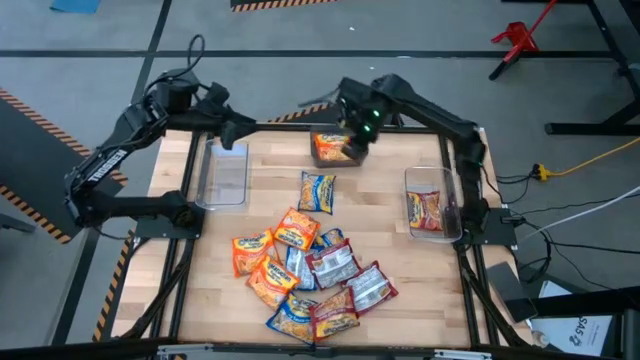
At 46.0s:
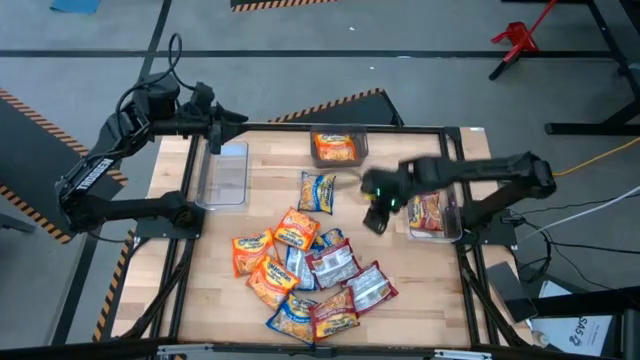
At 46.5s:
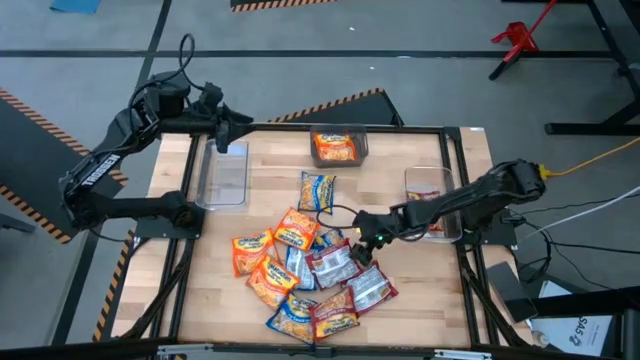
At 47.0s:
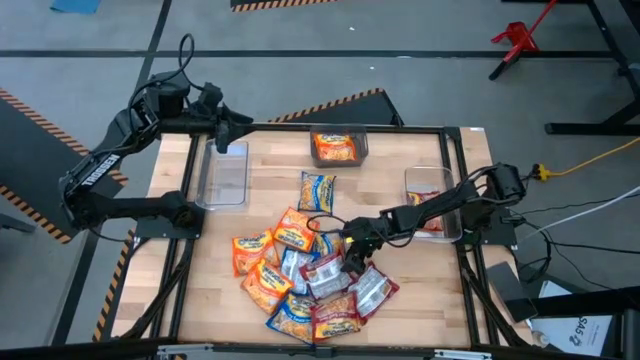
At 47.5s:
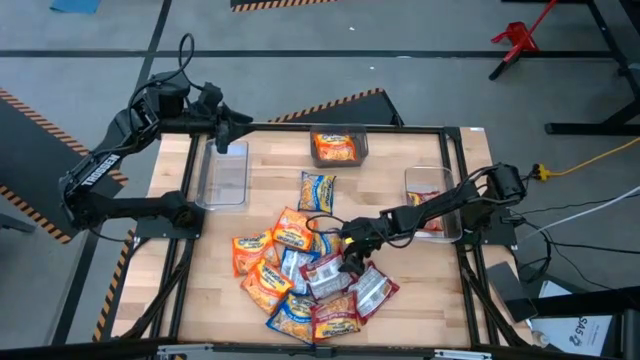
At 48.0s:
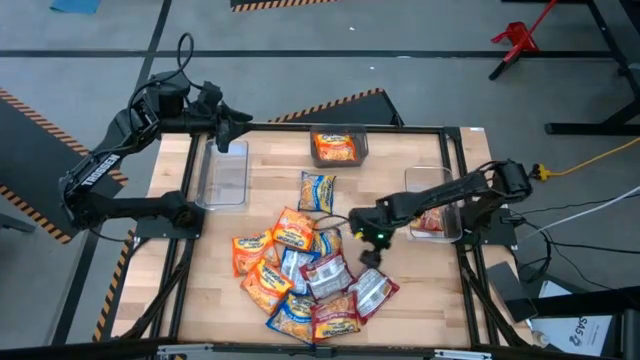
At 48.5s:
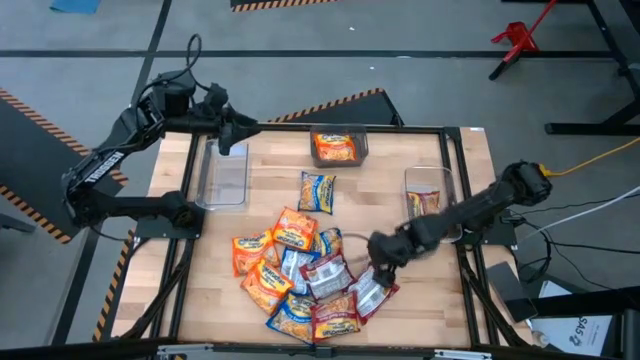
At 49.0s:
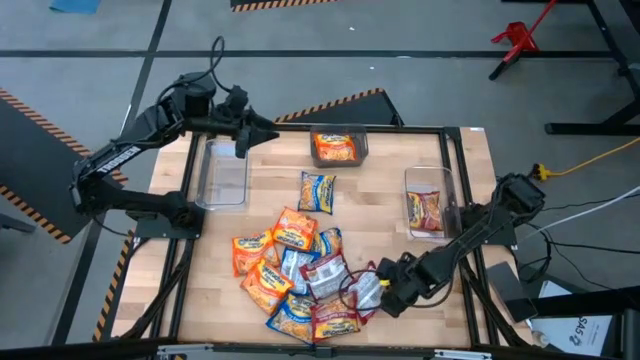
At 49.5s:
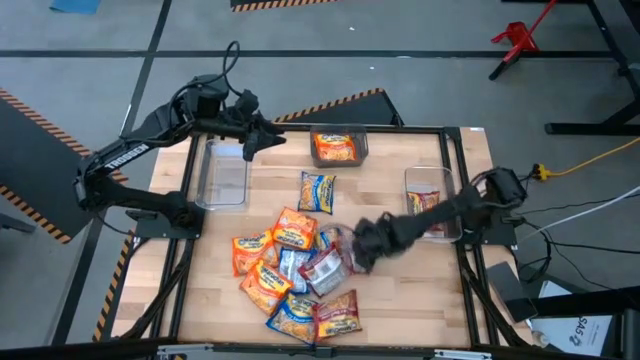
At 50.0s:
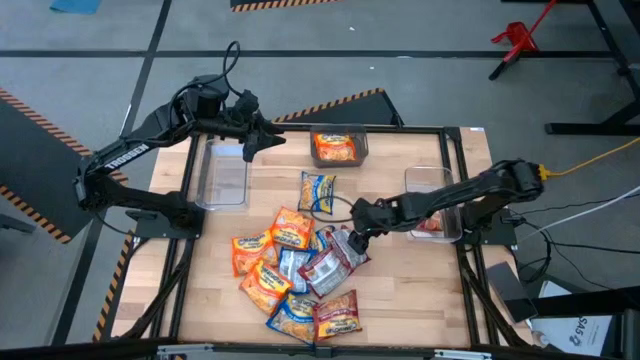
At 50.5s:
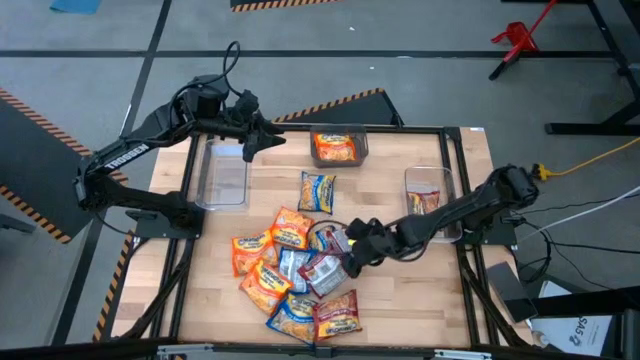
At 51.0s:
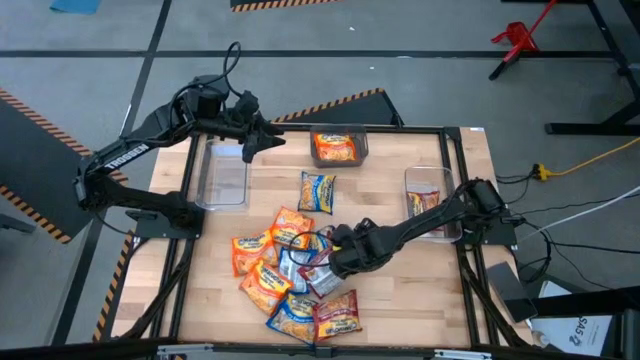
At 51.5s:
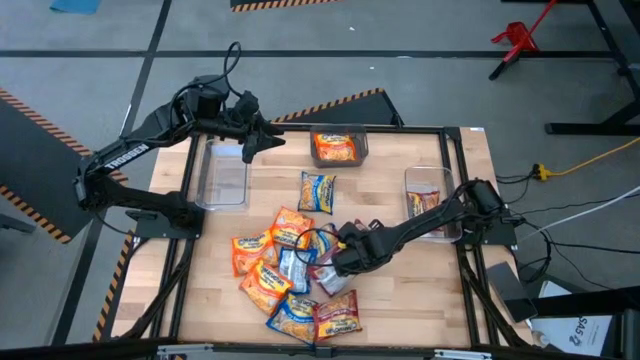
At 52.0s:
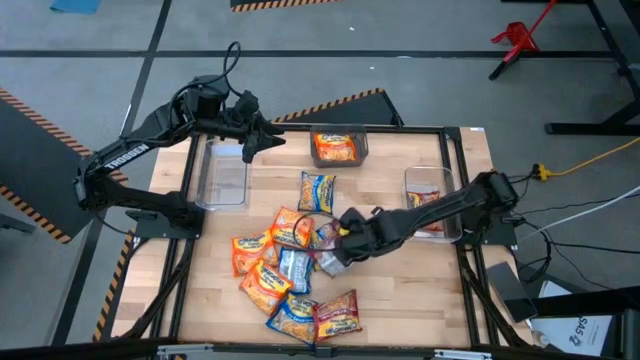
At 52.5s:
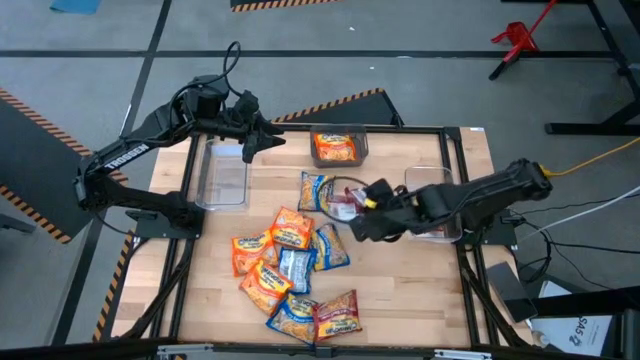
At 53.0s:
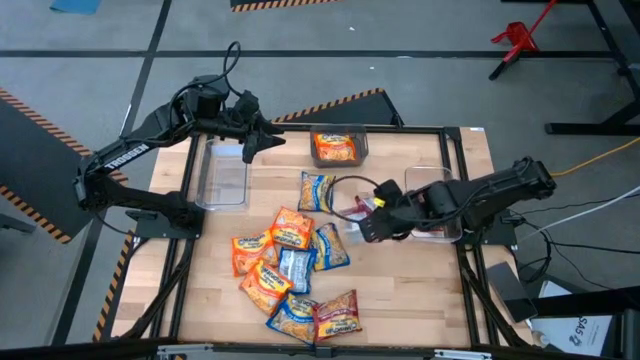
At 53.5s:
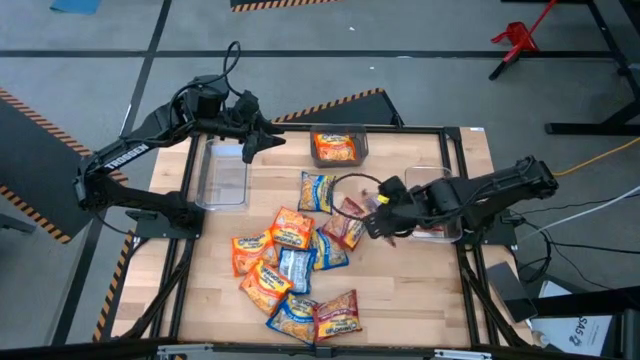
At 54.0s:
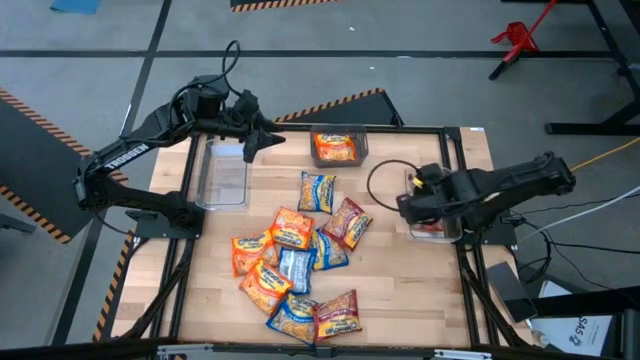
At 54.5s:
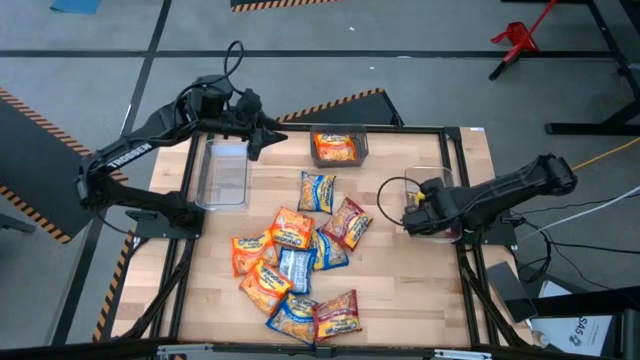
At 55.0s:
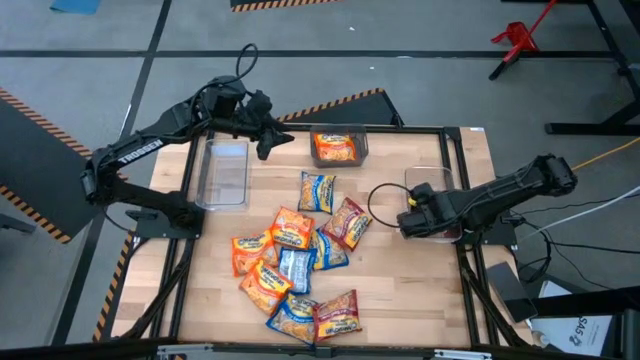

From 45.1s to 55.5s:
Task: Sort Maruchan noodles
Put the red noodle pack into the right transparent bin

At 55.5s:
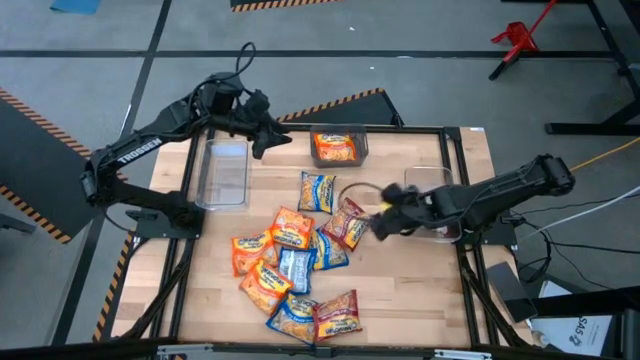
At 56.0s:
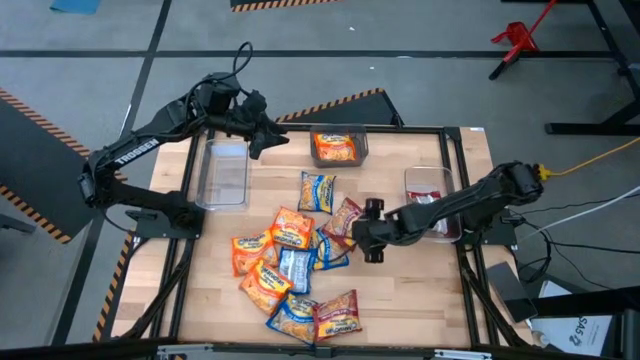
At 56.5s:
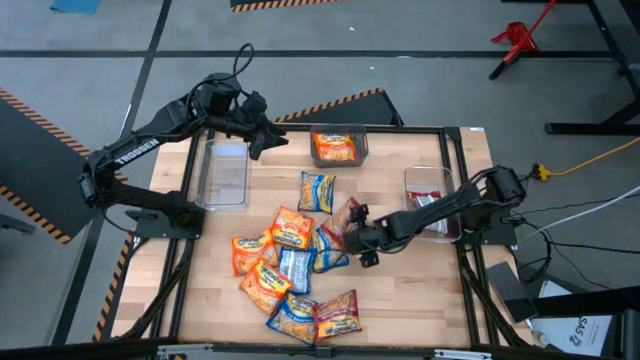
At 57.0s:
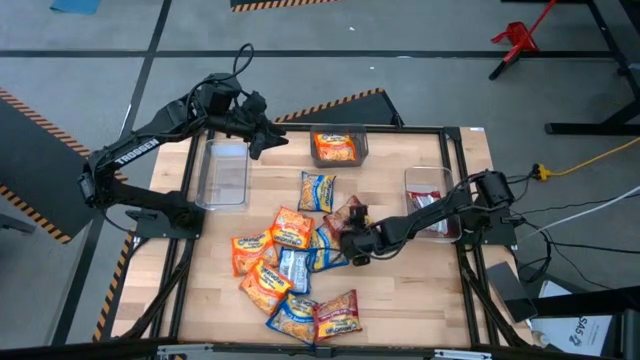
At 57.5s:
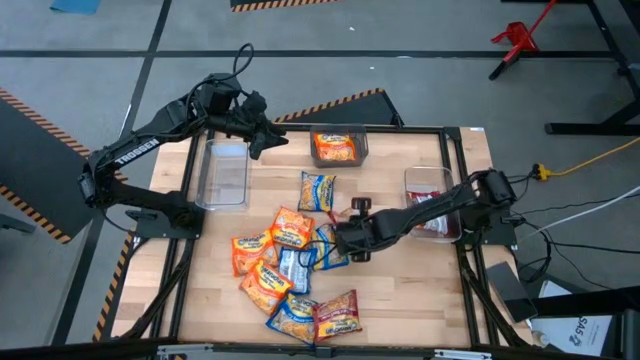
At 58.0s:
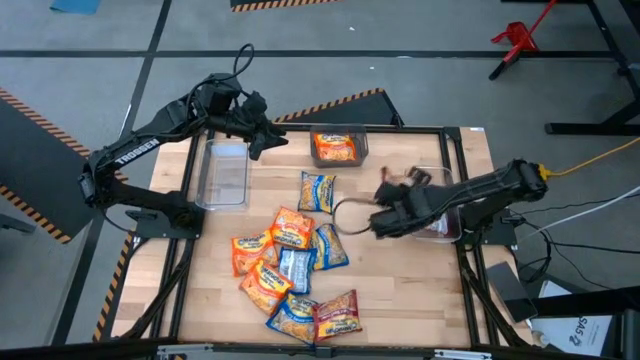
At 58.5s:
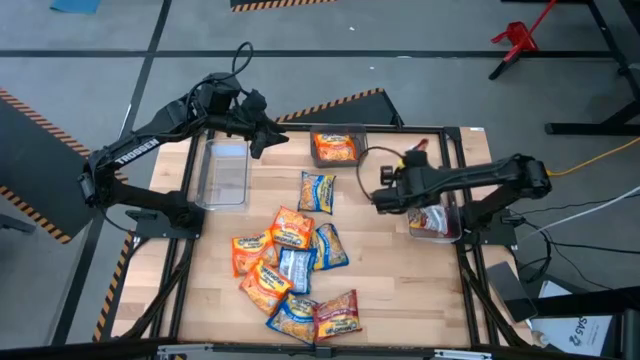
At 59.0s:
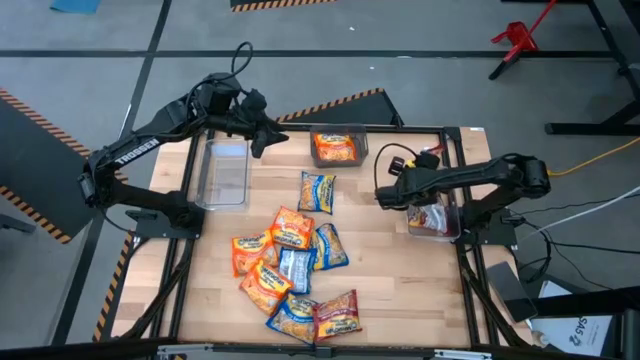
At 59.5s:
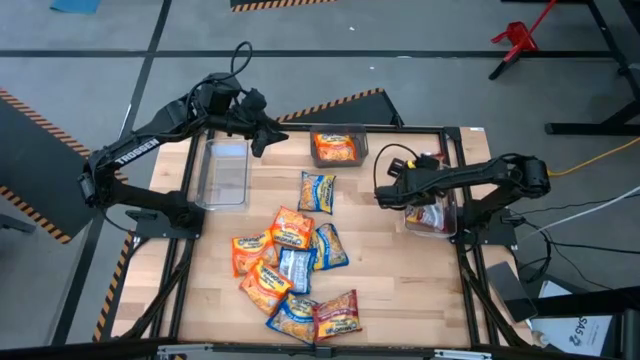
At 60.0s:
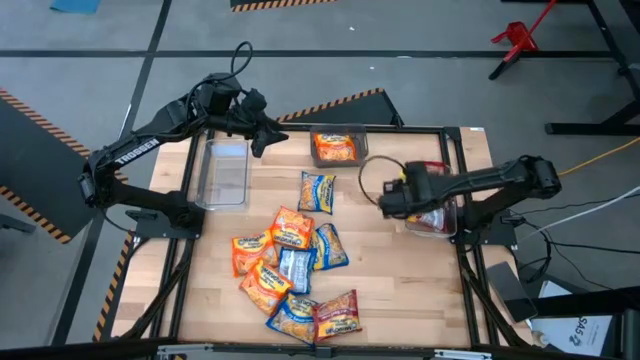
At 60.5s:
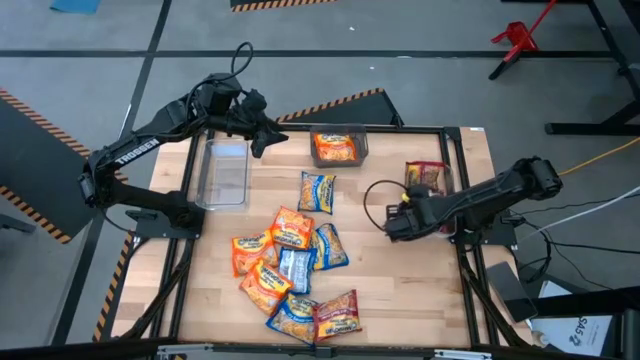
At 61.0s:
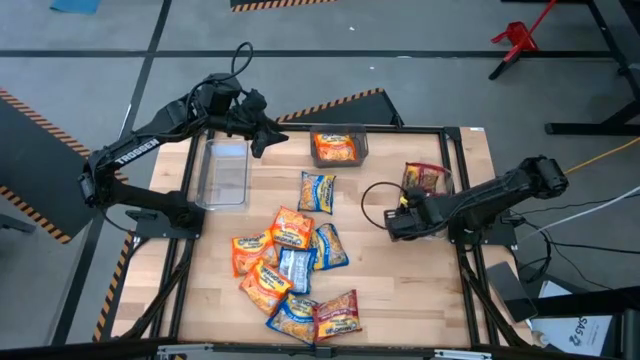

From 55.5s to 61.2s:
Put the red noodle pack into the right transparent bin

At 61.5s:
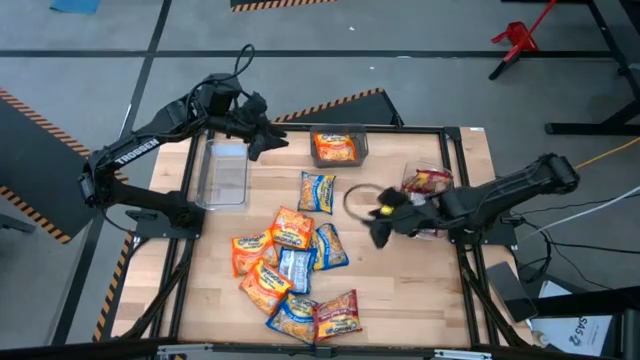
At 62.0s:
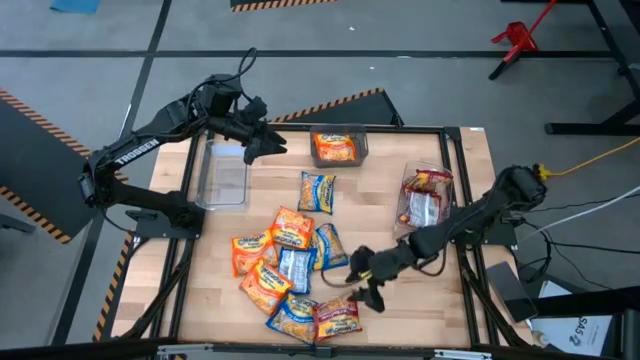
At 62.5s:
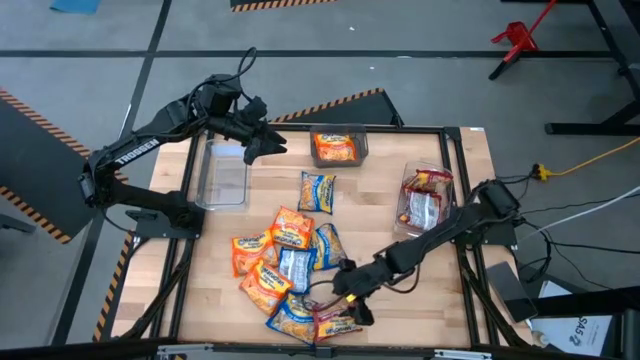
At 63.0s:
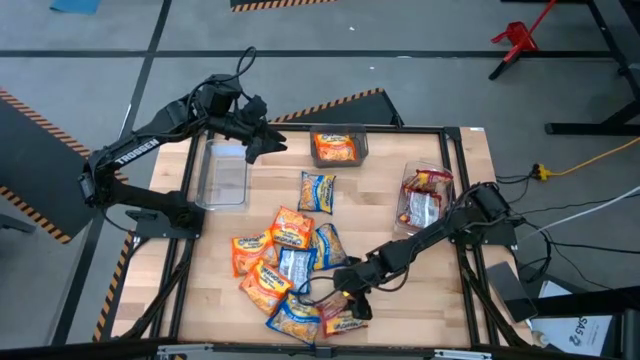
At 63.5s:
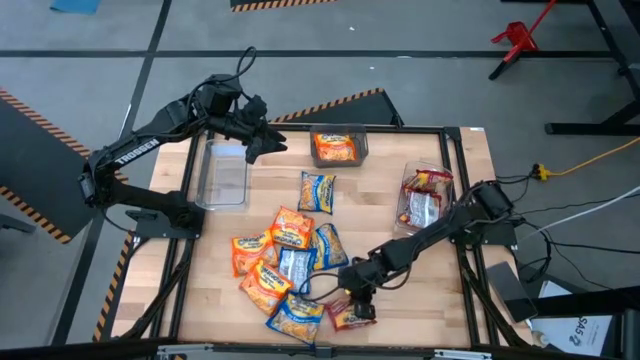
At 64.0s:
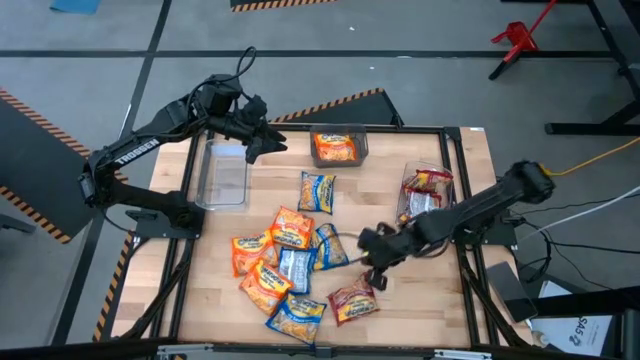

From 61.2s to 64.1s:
Put the red noodle pack into the right transparent bin

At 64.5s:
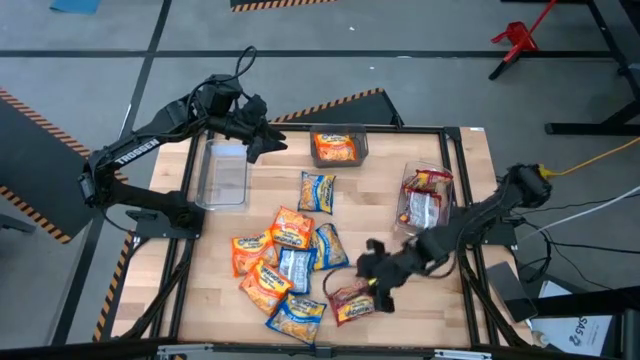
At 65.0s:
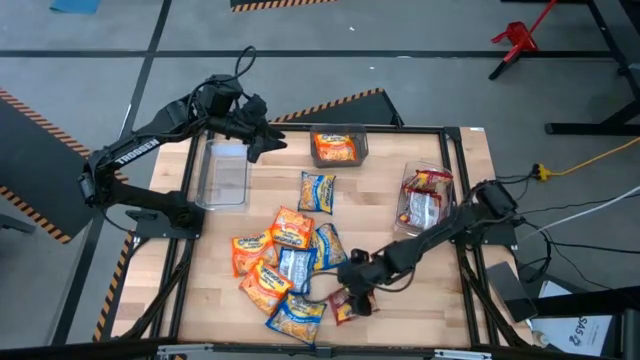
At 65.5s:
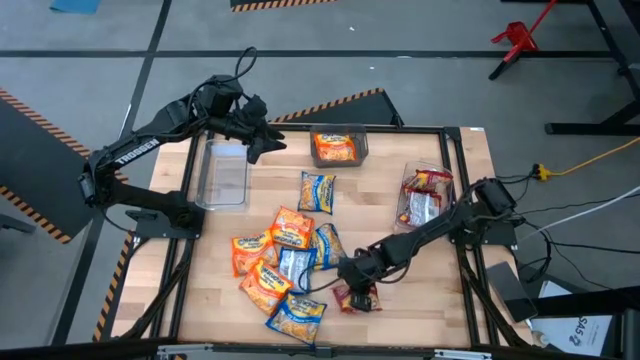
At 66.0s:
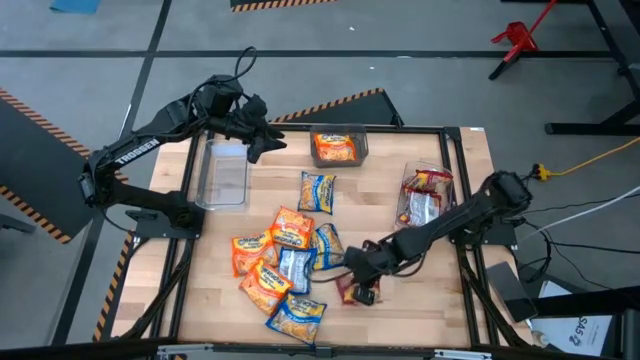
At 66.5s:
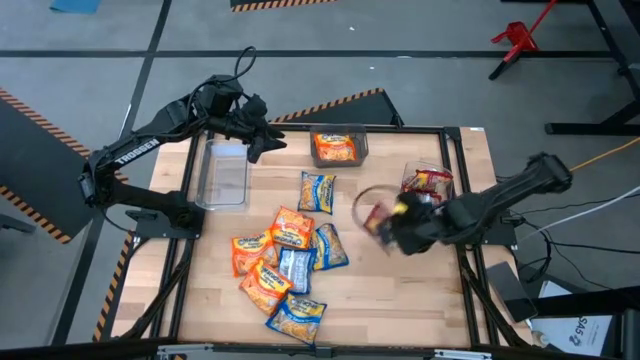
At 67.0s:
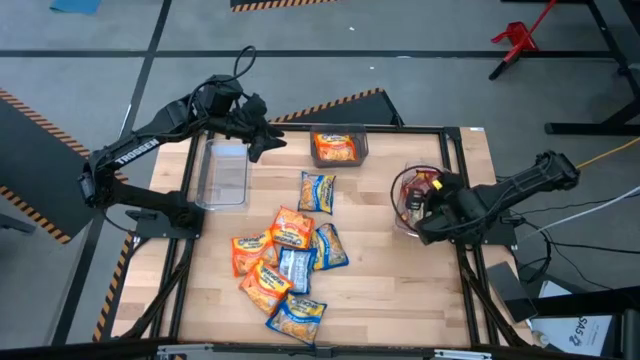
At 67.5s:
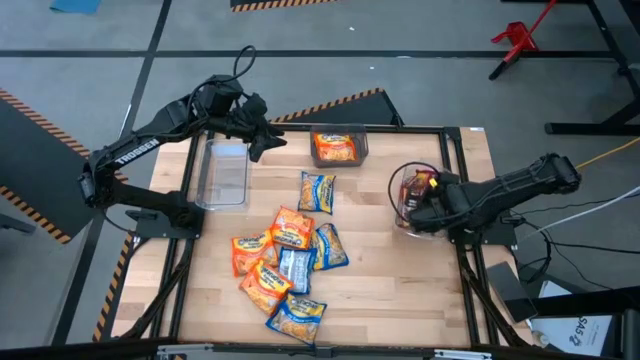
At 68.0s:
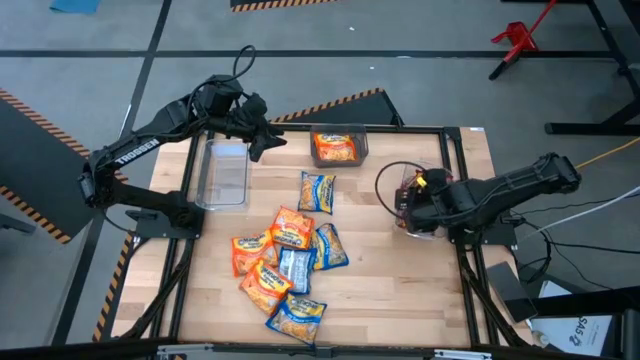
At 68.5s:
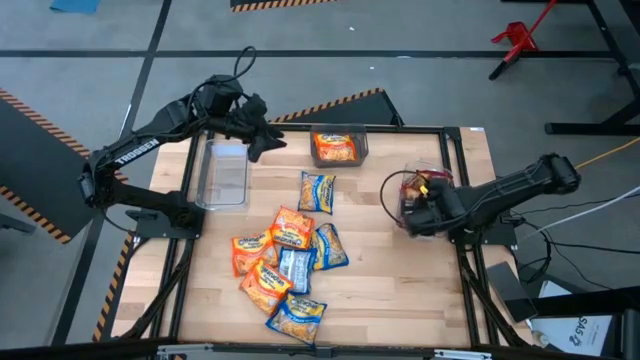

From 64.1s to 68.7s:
Put the red noodle pack into the right transparent bin
